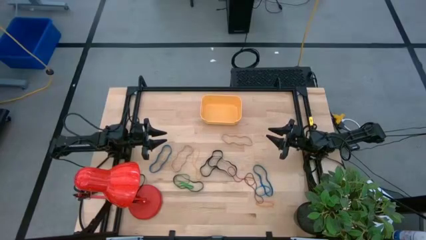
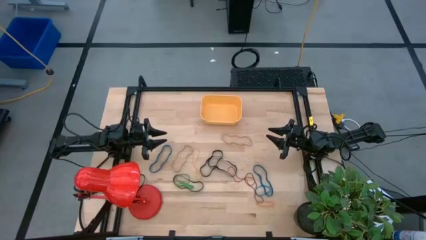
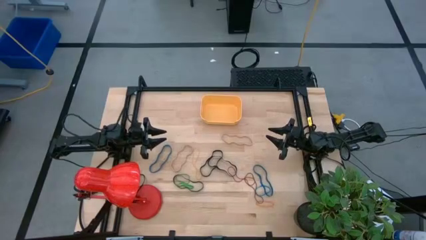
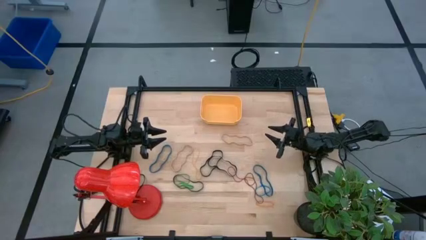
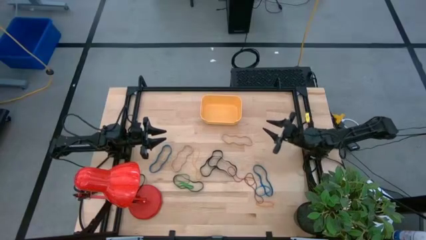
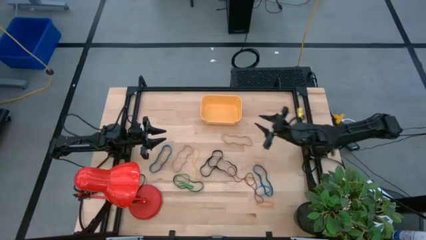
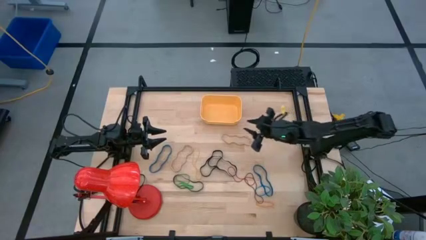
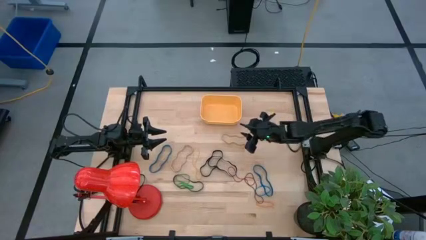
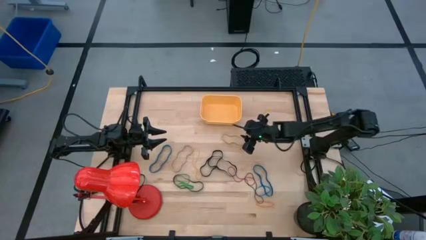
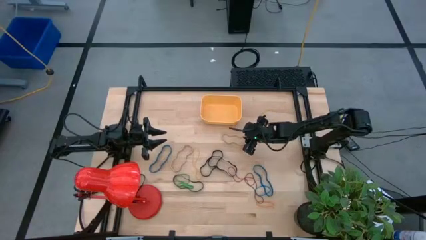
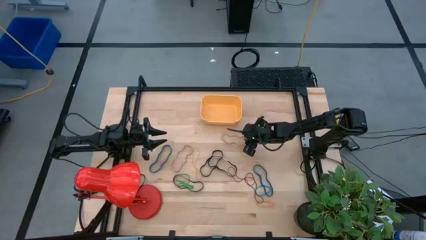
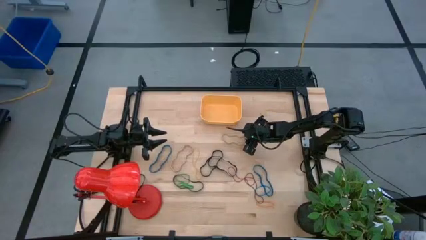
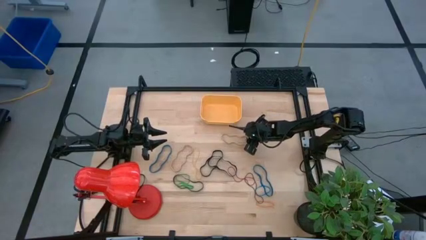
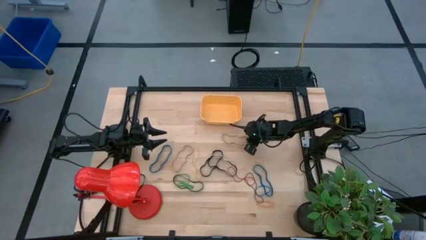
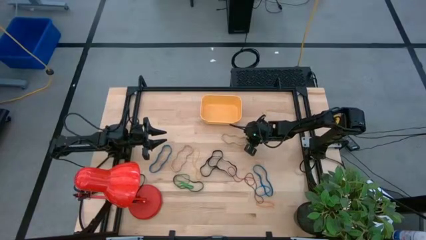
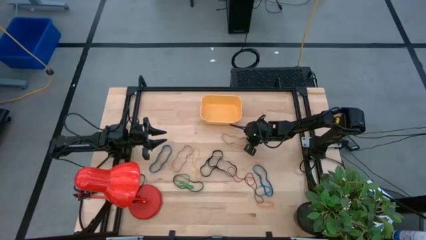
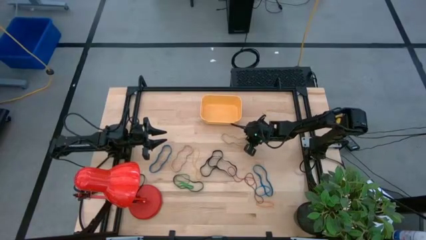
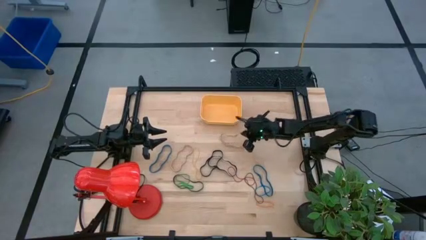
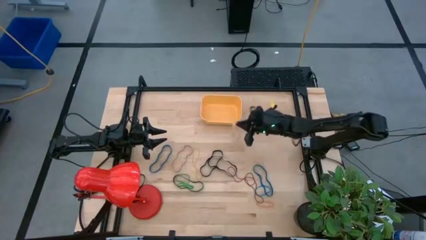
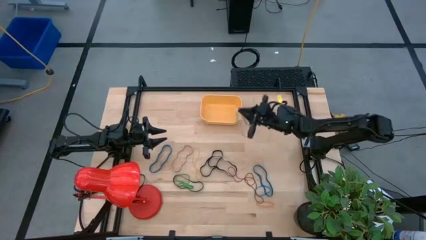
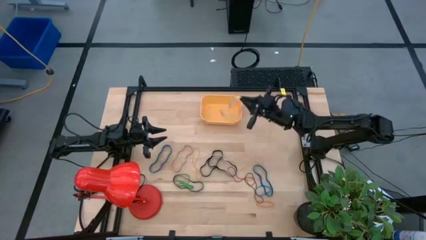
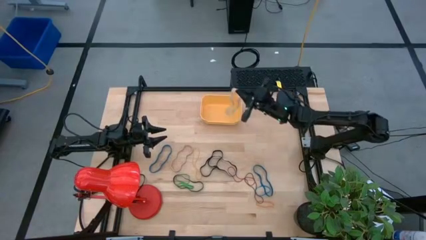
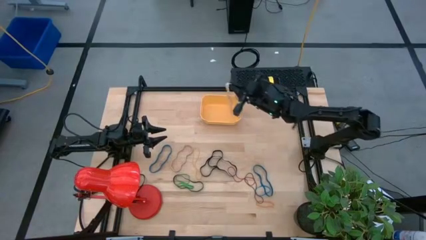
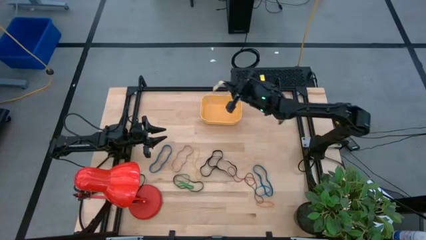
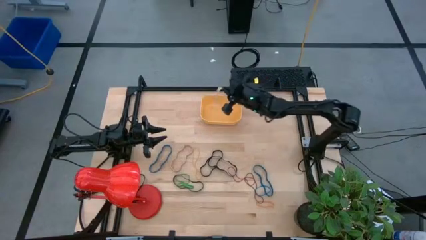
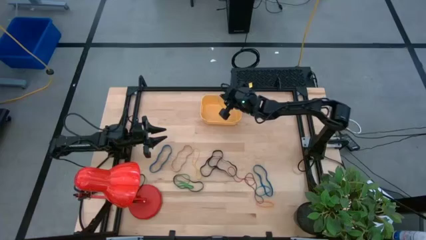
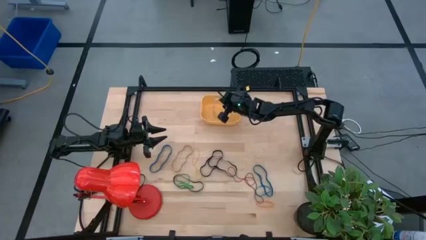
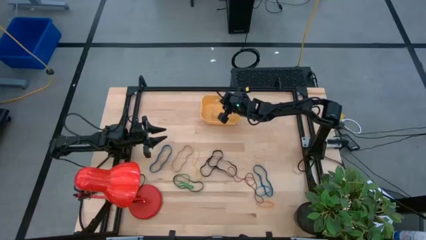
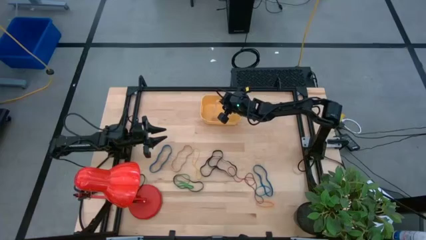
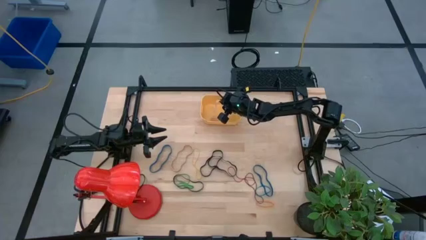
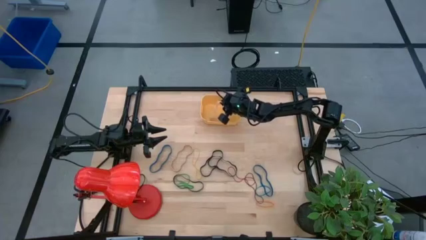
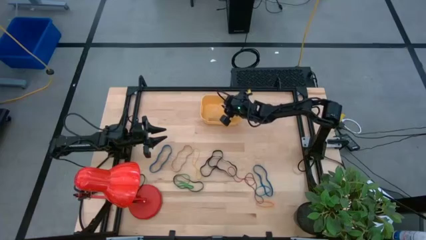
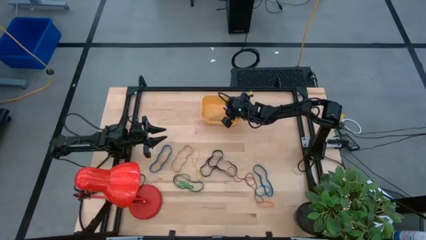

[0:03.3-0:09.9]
Task: Pick and place rubber bands into bin
Put the top brown rubber band into the yellow bin

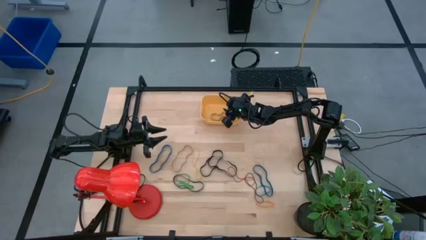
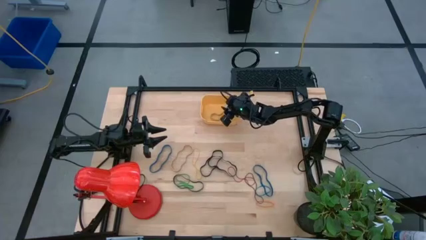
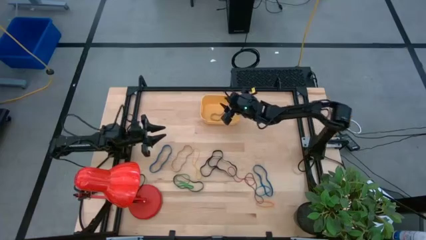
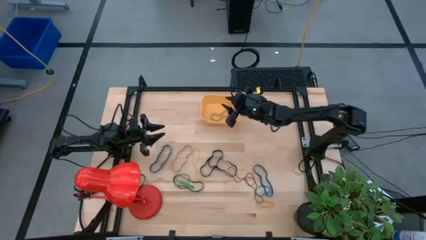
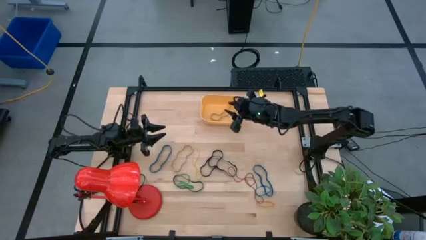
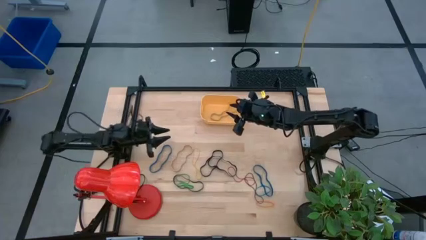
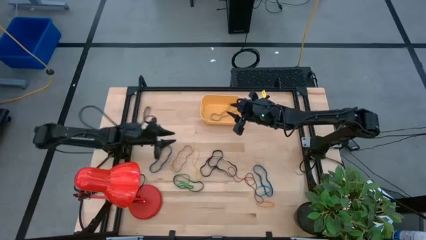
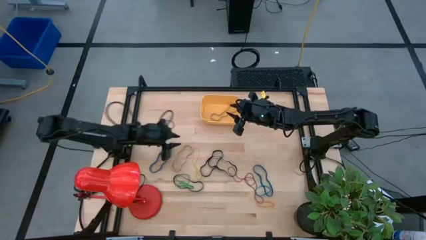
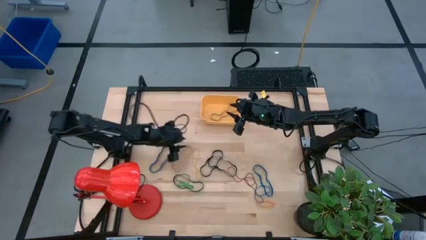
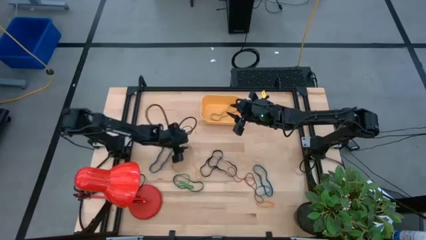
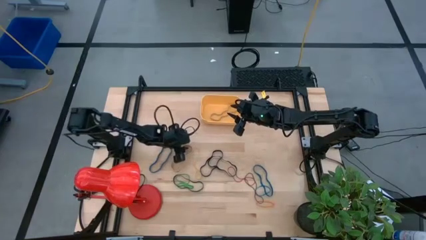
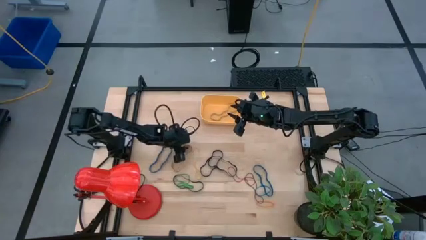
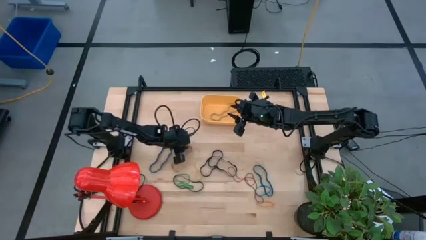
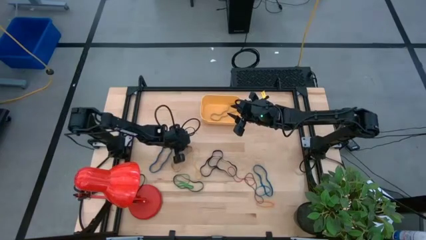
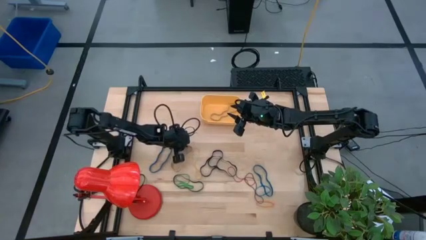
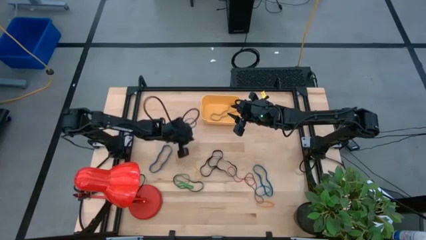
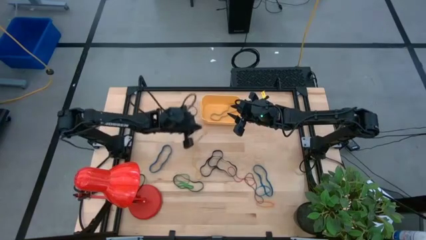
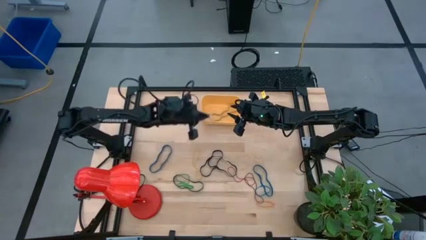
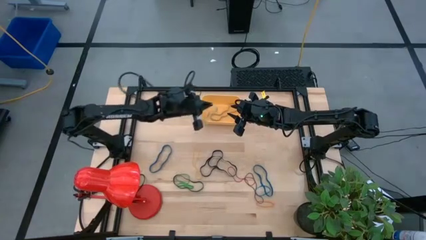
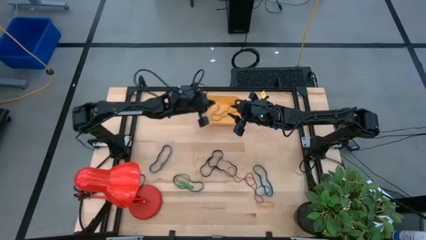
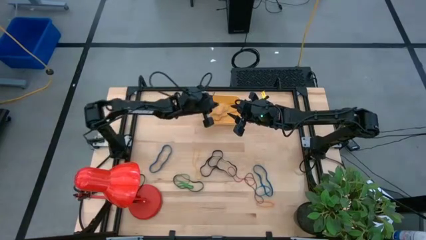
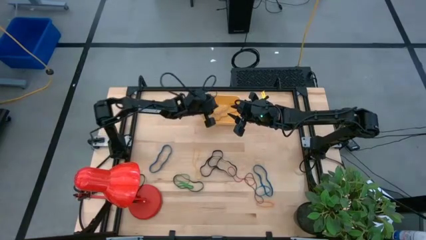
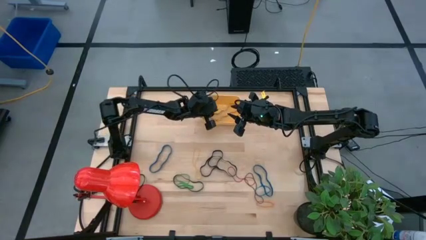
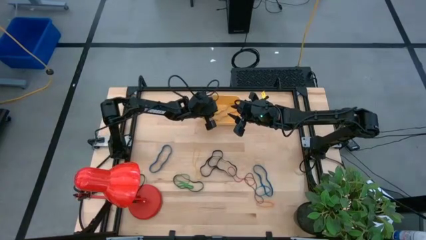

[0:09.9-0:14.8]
Put the brown rubber band into the yellow bin

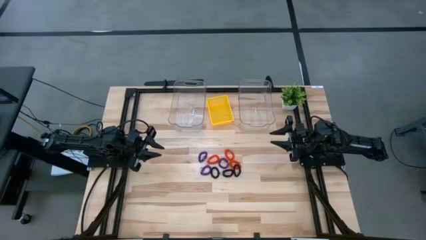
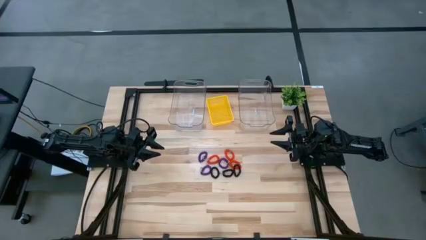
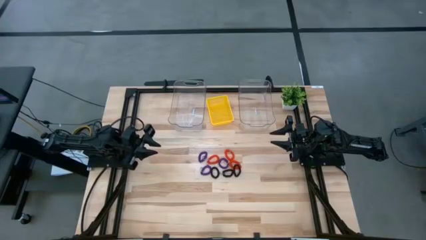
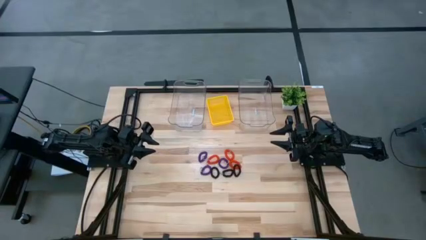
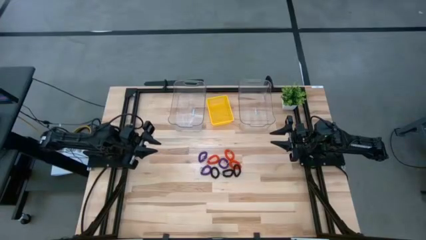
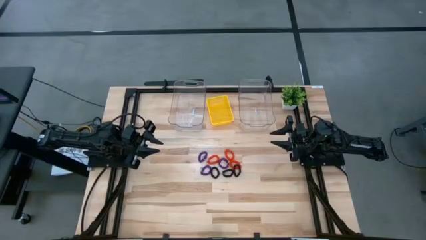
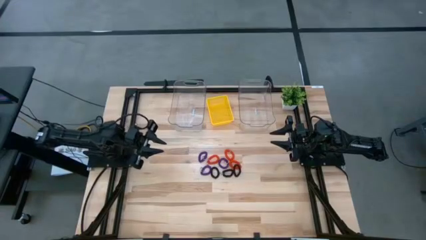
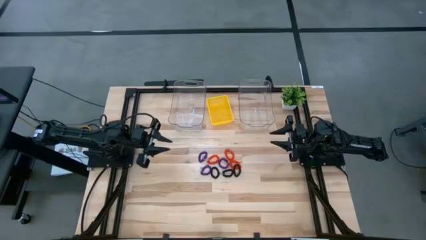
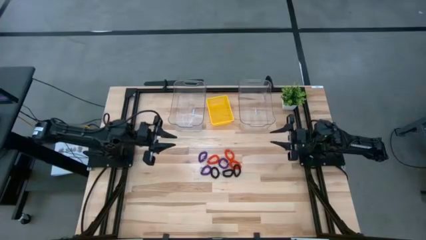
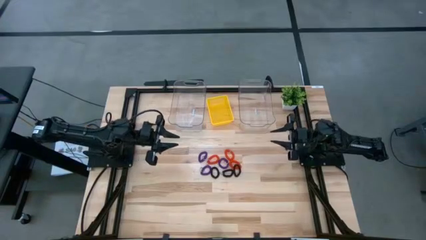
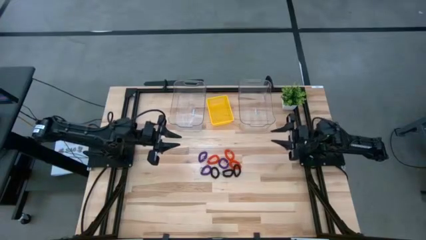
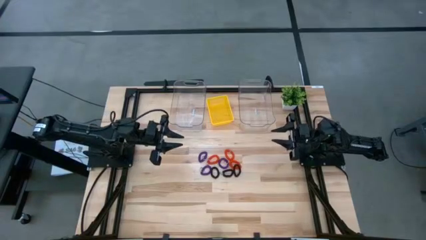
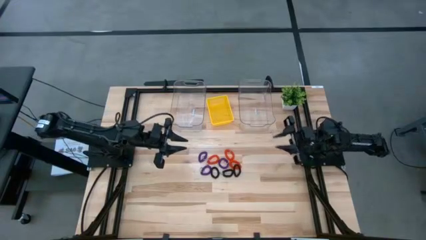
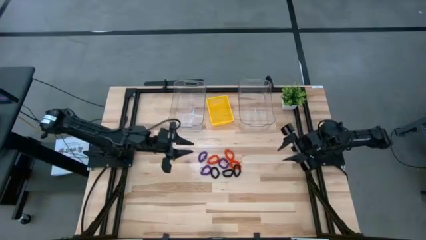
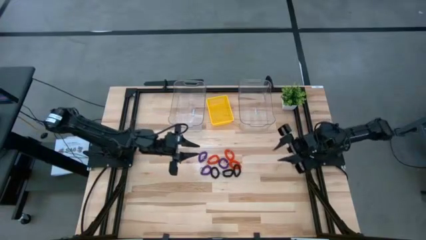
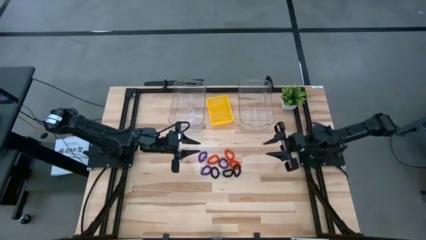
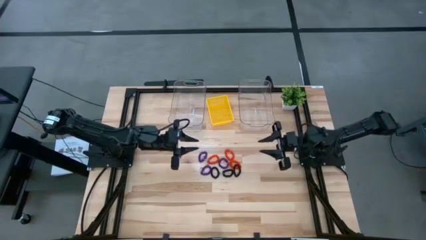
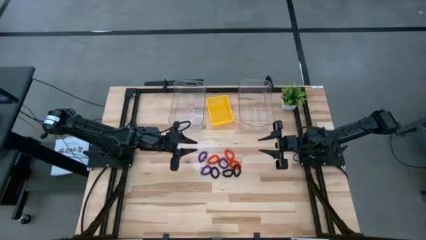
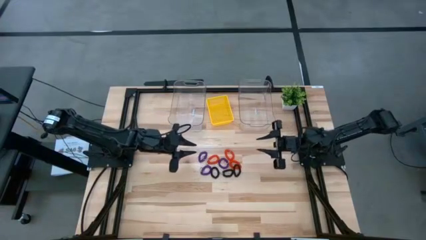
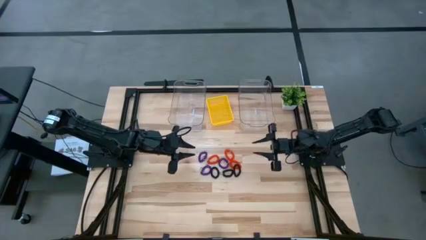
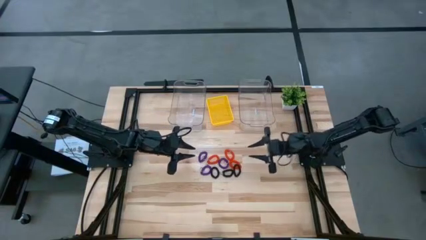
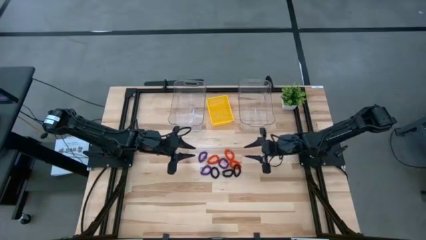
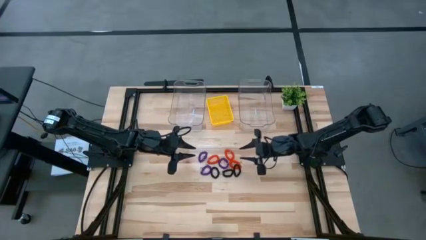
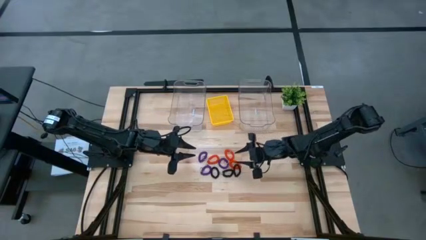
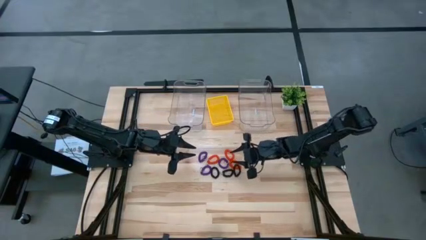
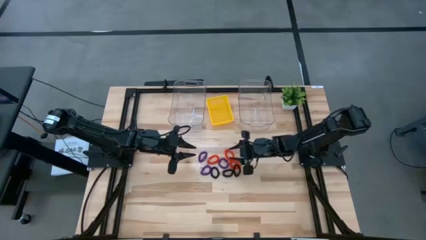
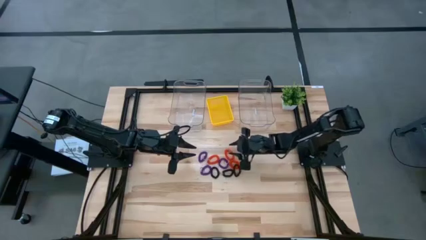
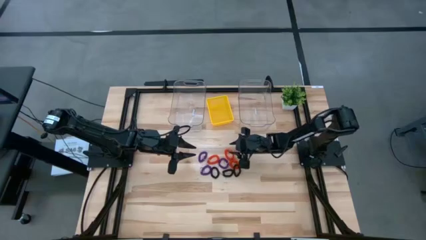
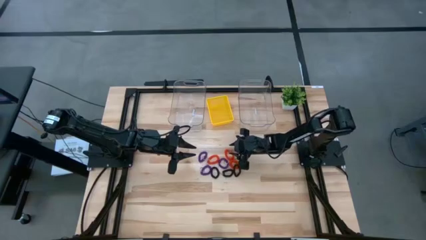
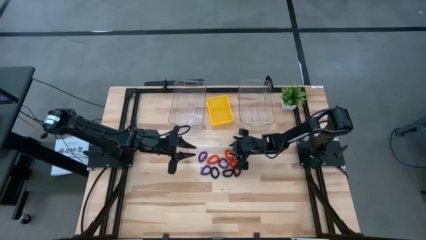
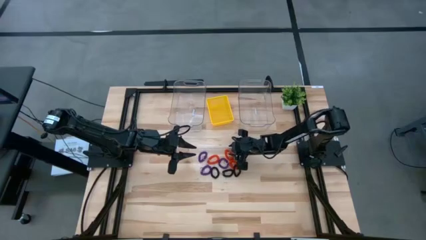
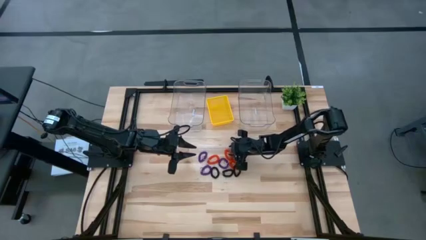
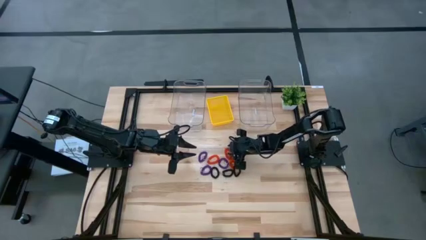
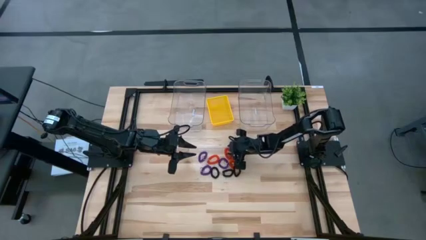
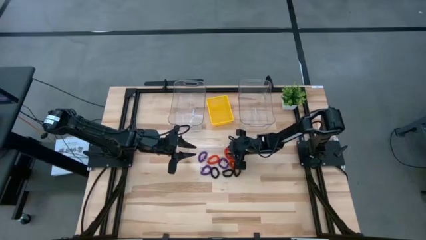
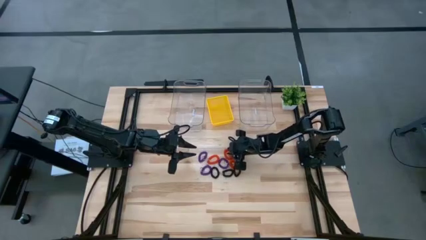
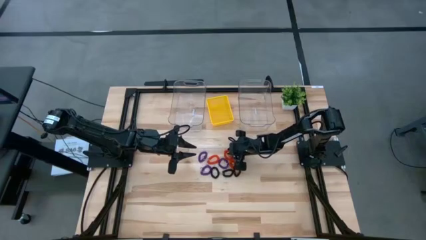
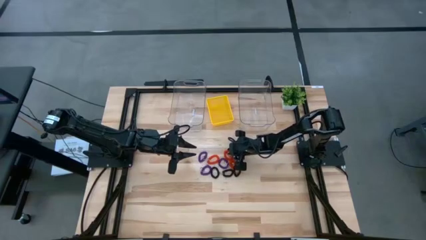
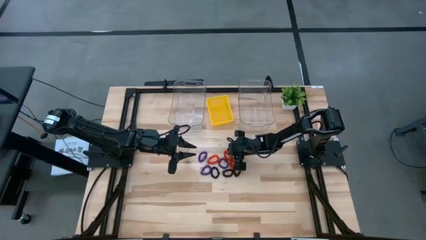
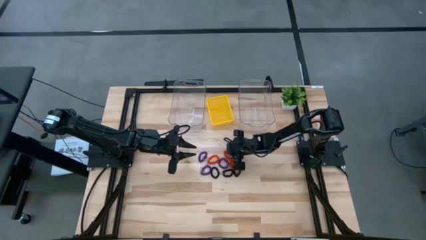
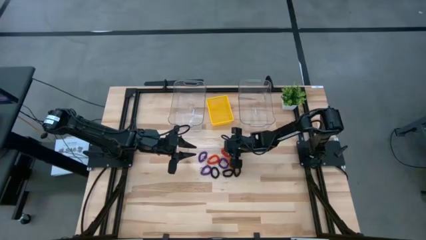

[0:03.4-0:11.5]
Task: Sort spring keychains
Put the top right orange spring keychain into the yellow bin
